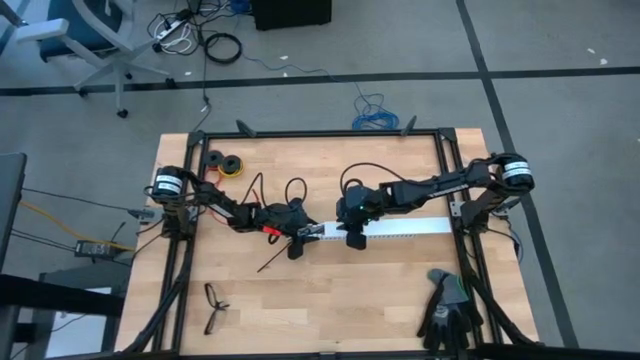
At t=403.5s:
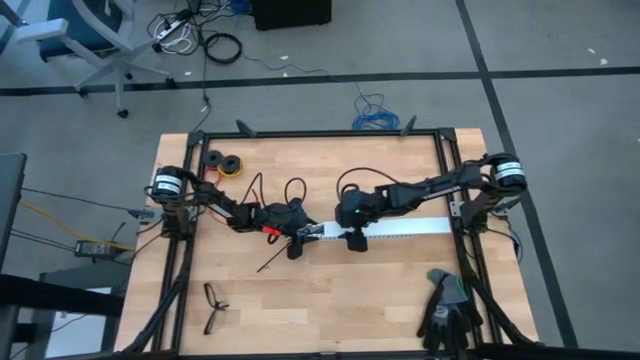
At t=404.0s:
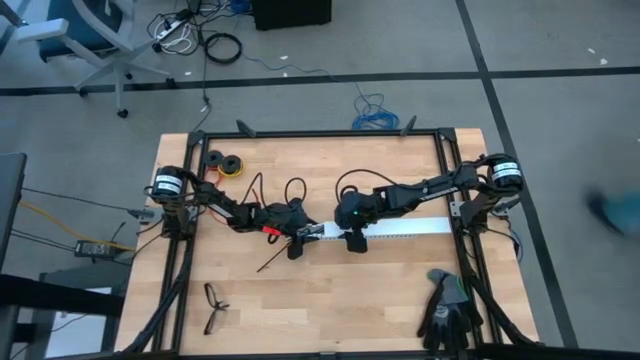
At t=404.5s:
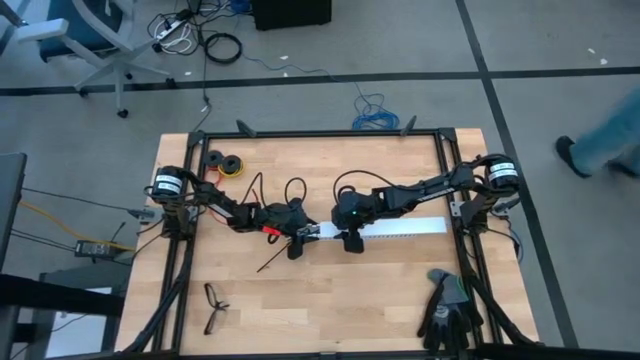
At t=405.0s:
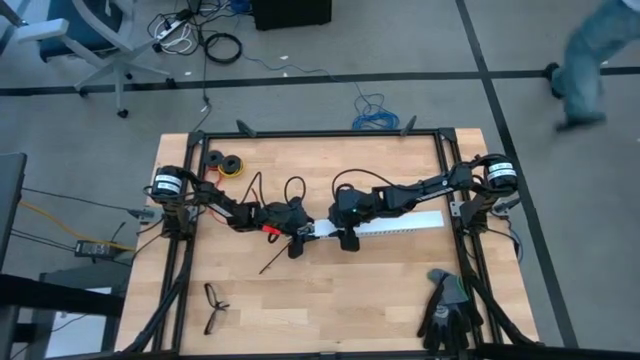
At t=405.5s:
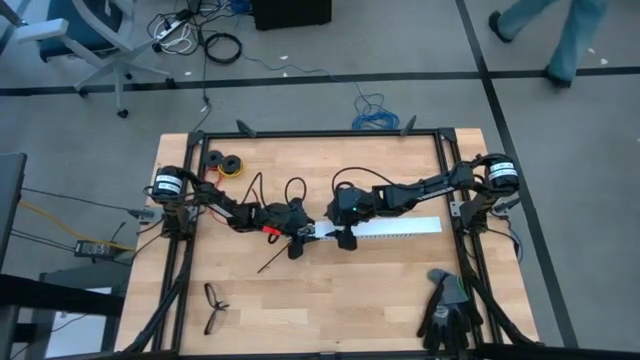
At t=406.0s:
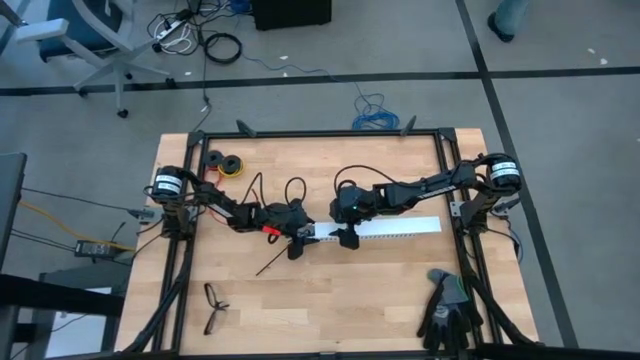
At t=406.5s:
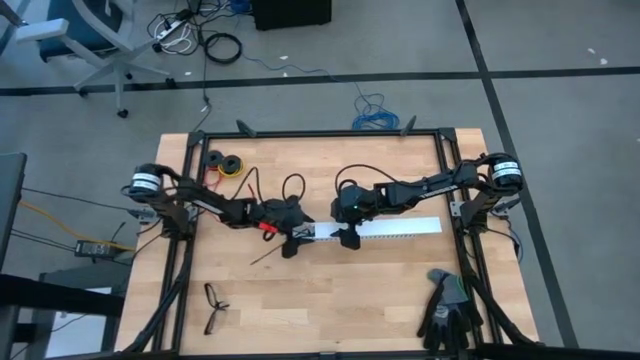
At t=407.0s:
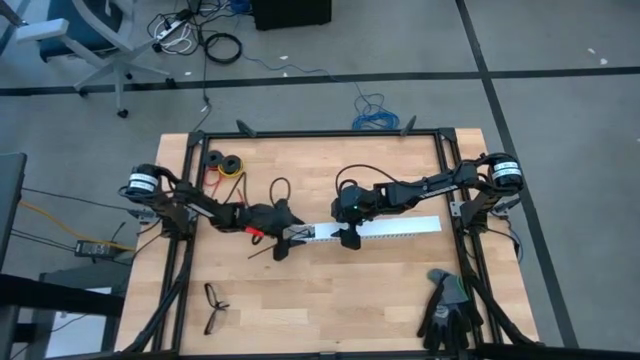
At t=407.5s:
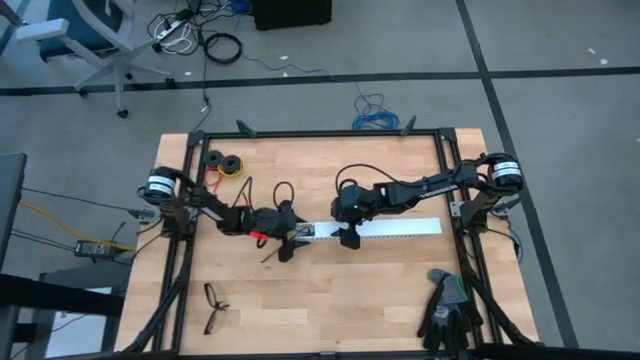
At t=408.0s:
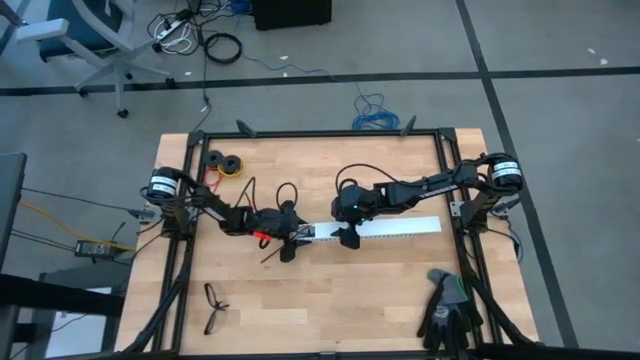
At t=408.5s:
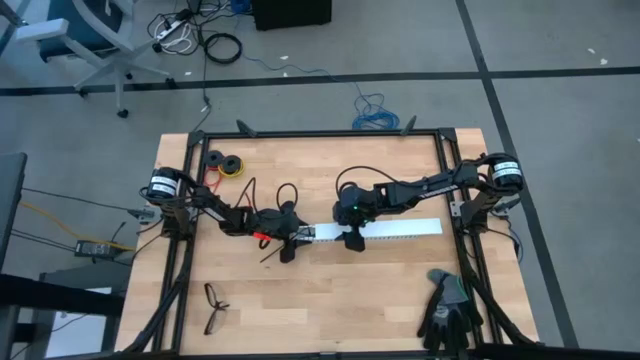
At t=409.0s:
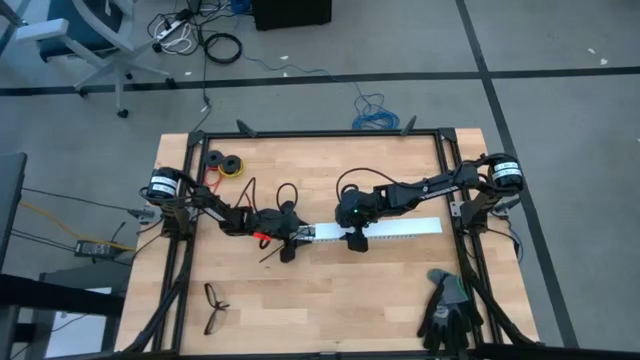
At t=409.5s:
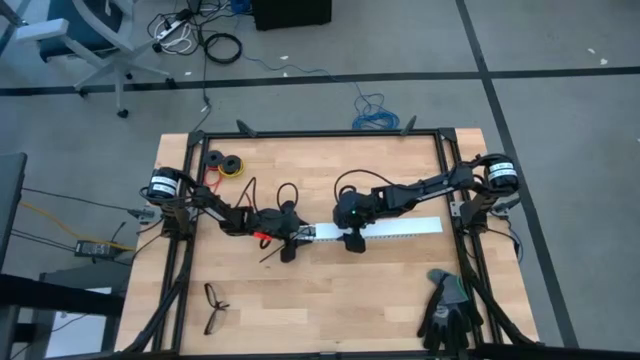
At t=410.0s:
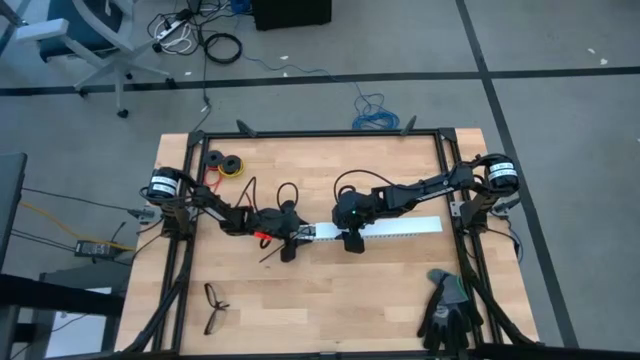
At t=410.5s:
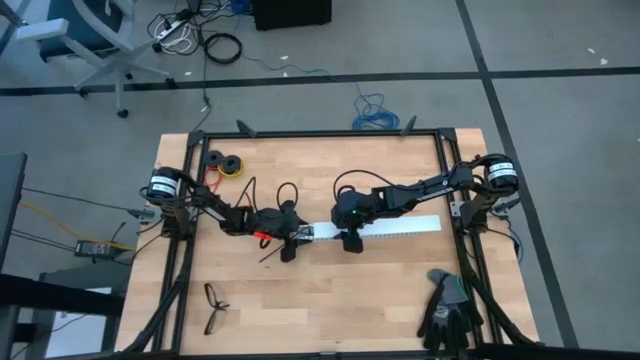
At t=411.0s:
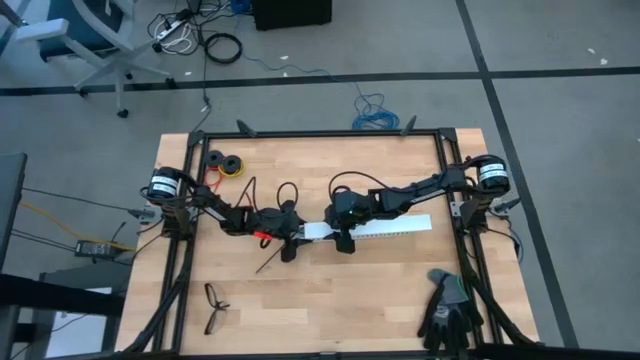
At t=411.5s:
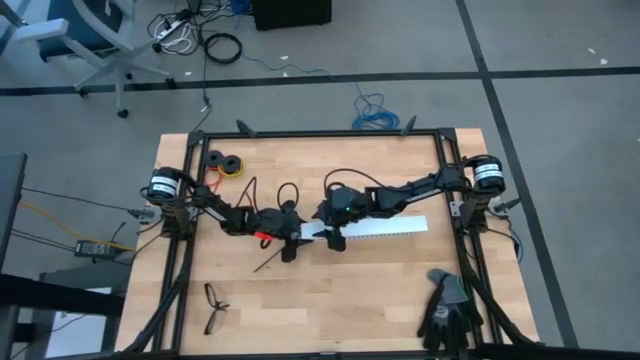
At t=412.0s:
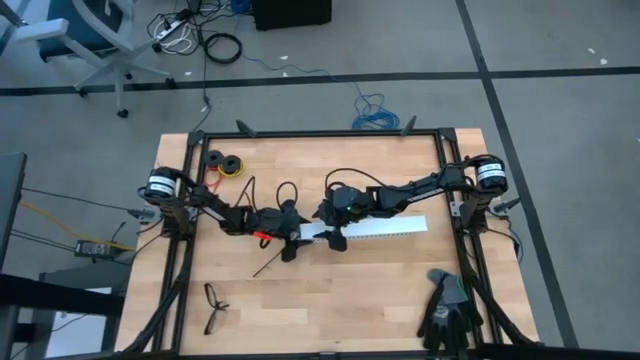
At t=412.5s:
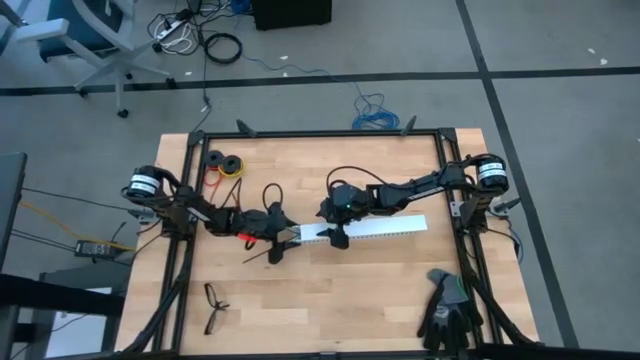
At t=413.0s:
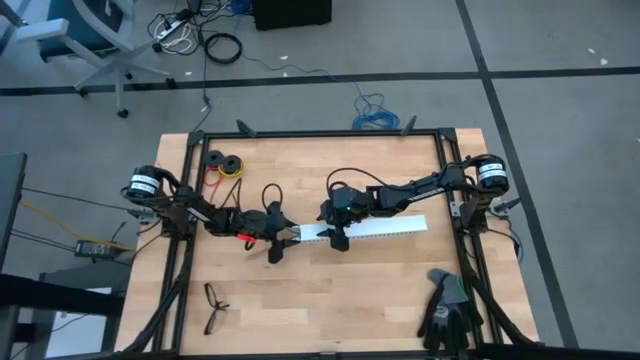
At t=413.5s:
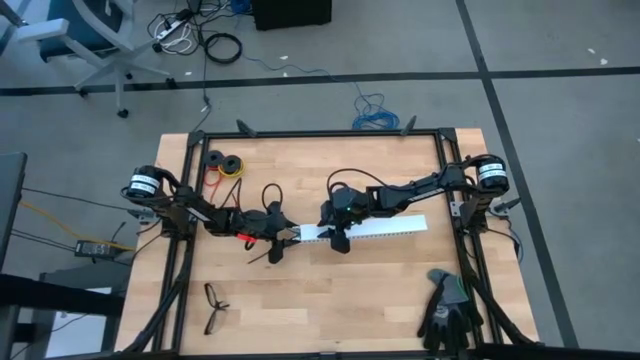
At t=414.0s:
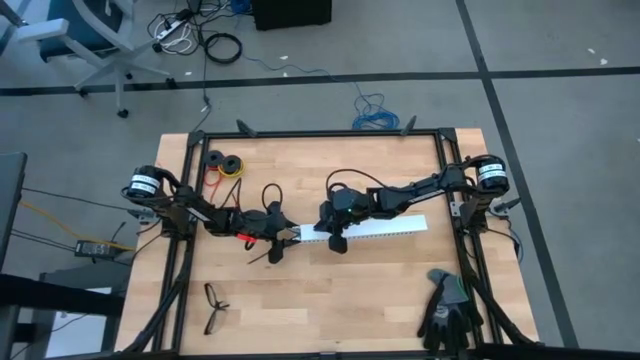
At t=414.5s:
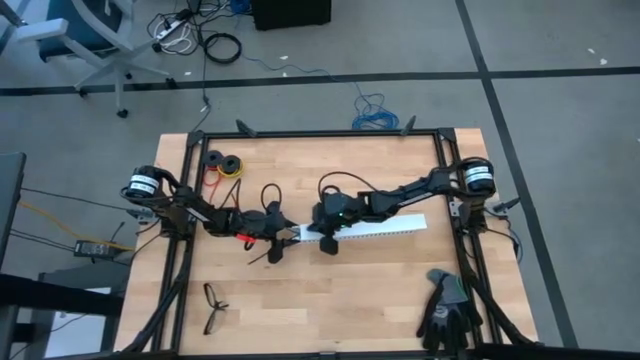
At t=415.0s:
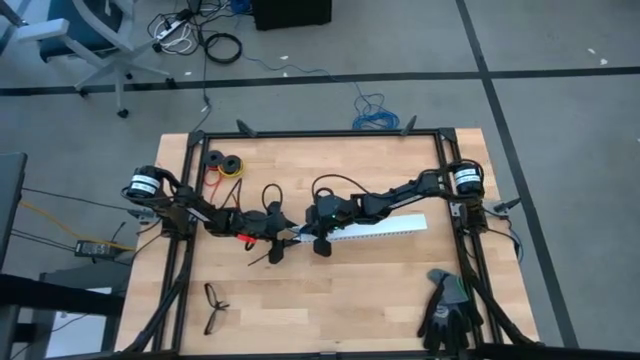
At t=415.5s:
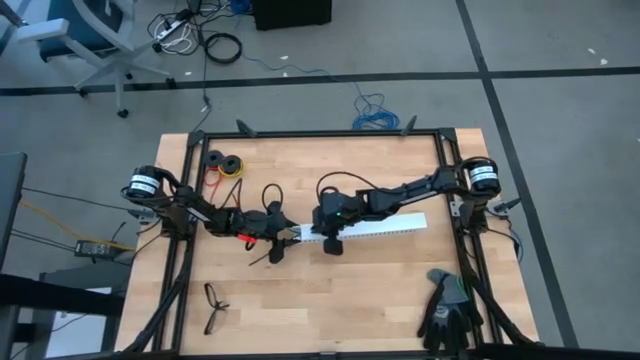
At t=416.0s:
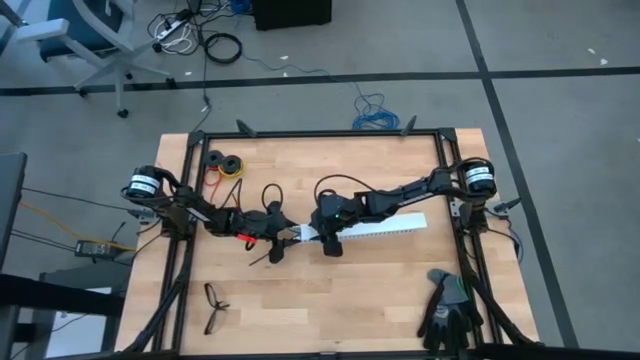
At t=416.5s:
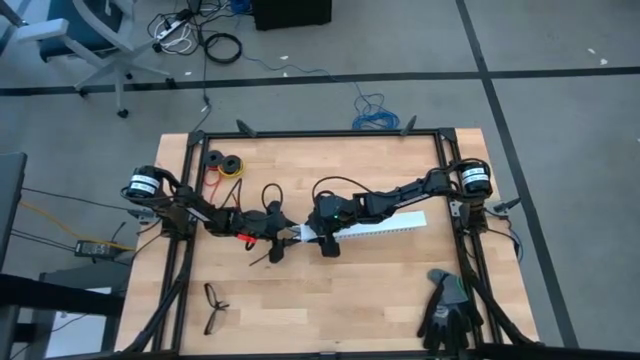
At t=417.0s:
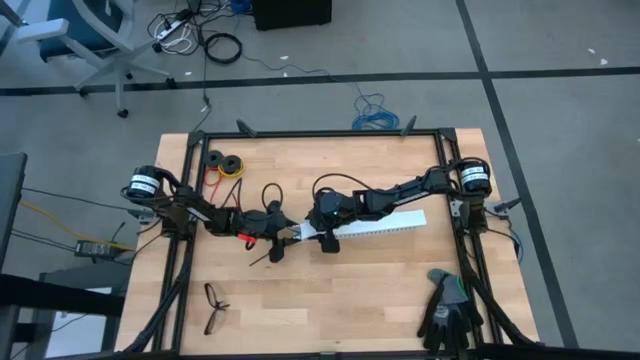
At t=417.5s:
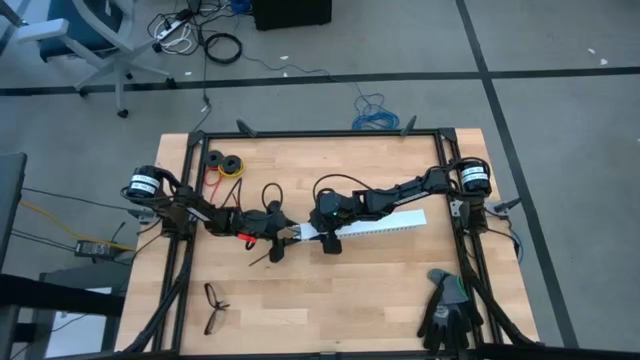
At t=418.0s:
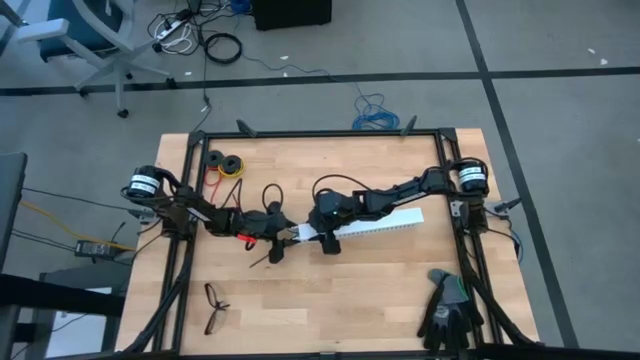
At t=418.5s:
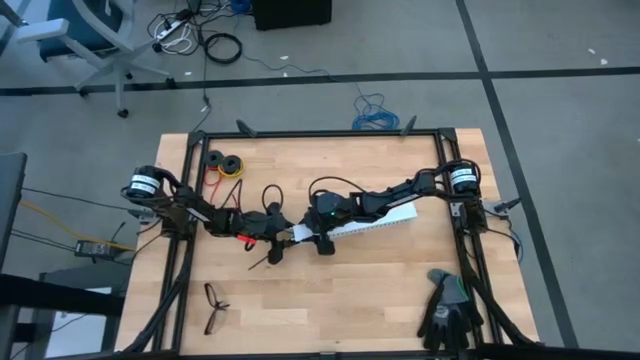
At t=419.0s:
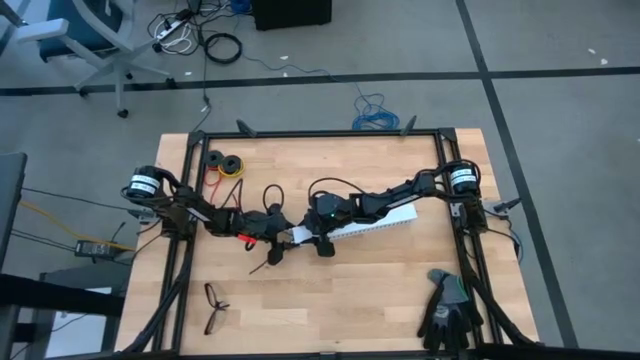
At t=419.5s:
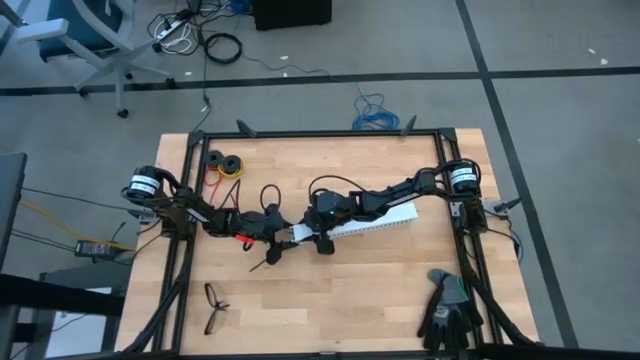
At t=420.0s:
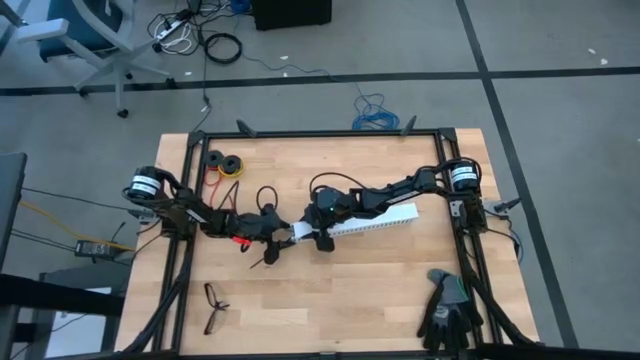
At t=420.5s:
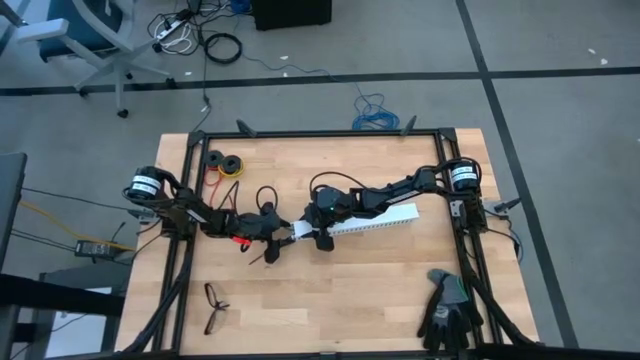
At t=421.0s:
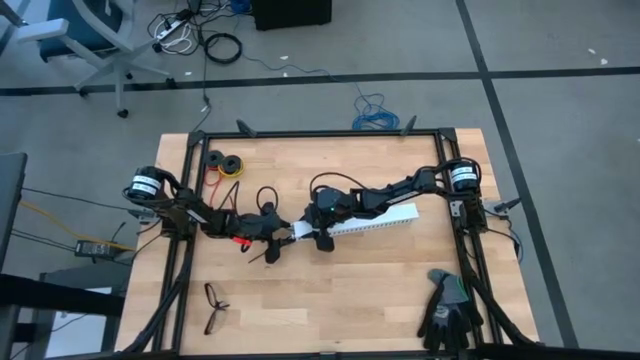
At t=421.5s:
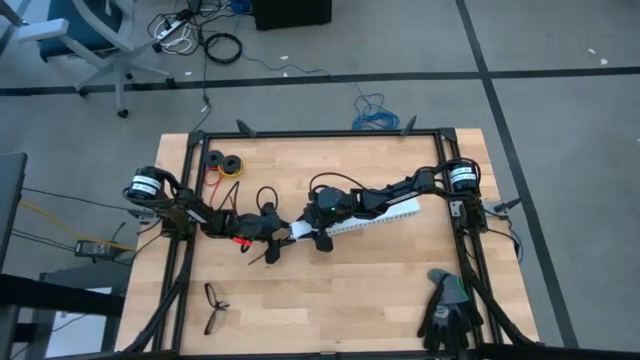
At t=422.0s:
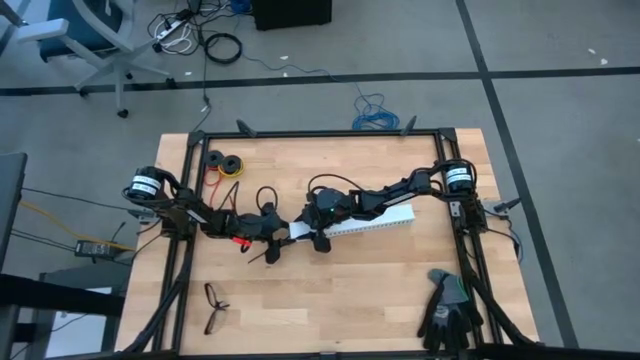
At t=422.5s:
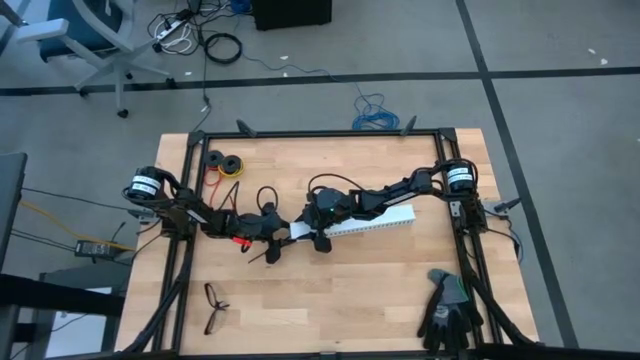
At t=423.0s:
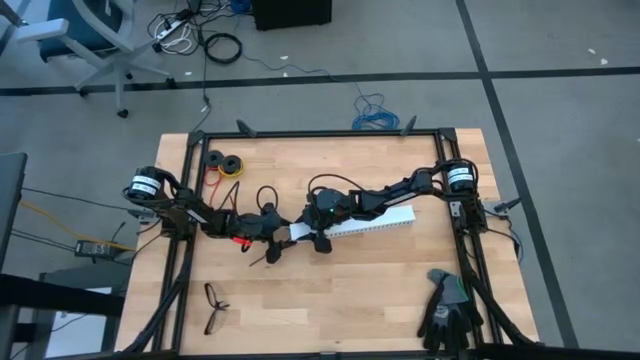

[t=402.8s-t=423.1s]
Task: Ziptie cables
Close the white cable duct
